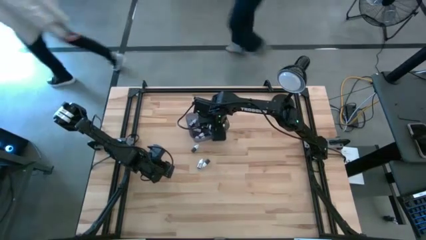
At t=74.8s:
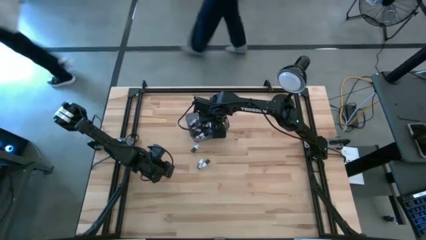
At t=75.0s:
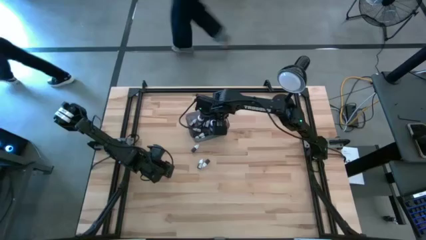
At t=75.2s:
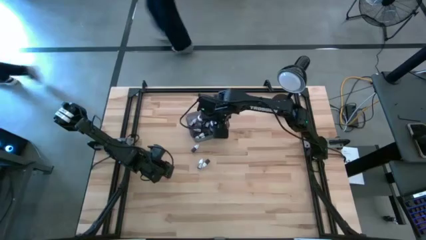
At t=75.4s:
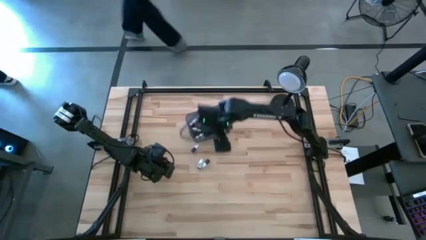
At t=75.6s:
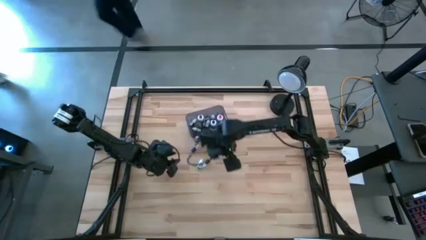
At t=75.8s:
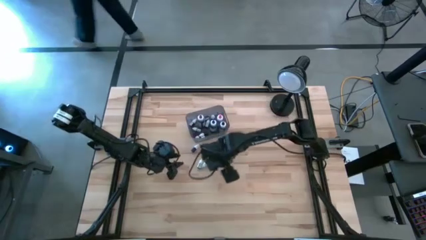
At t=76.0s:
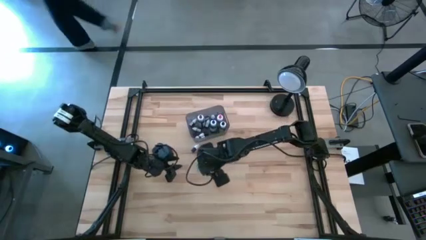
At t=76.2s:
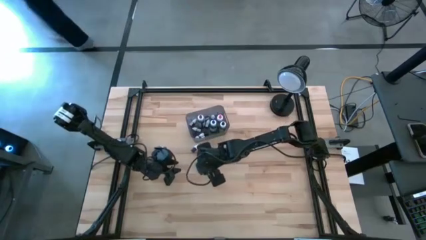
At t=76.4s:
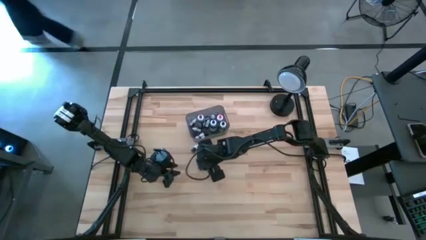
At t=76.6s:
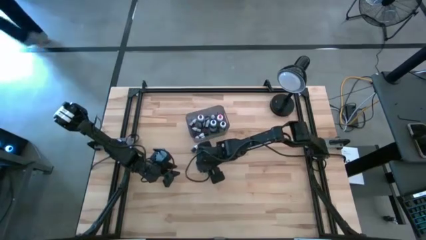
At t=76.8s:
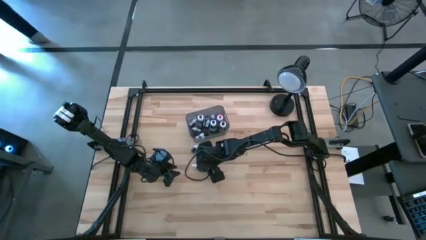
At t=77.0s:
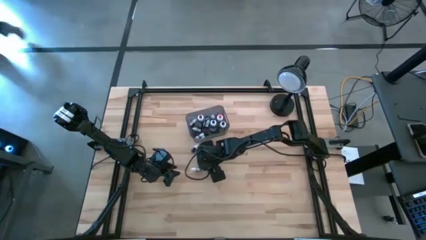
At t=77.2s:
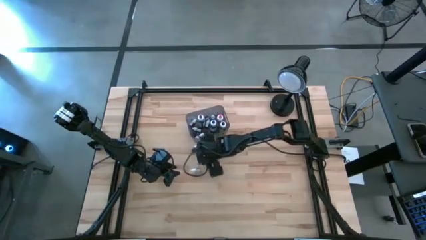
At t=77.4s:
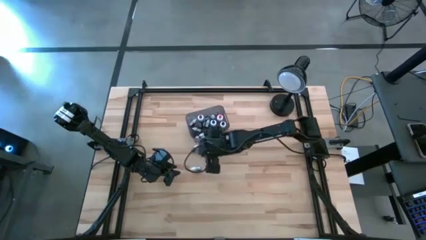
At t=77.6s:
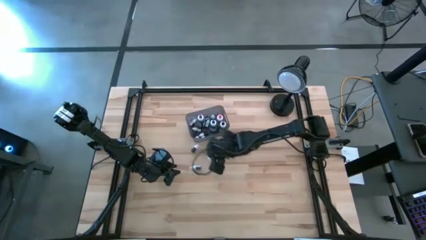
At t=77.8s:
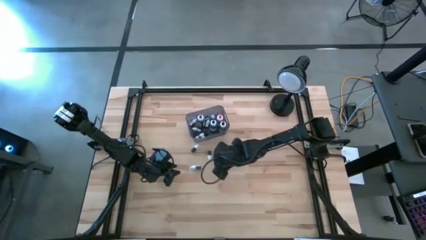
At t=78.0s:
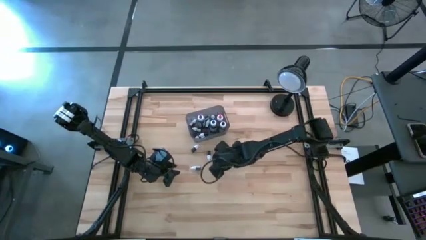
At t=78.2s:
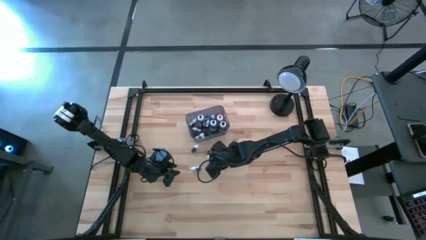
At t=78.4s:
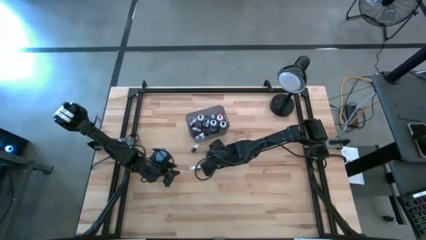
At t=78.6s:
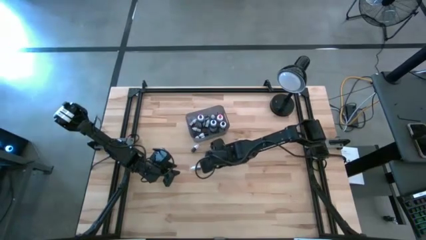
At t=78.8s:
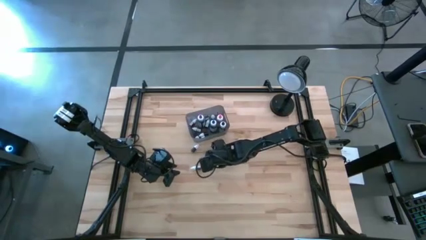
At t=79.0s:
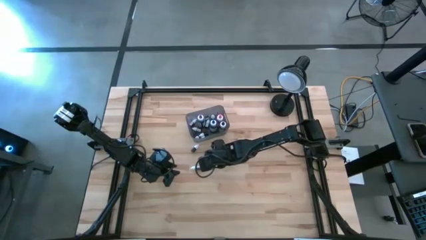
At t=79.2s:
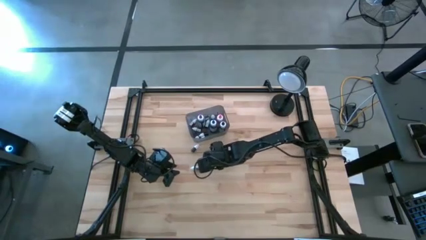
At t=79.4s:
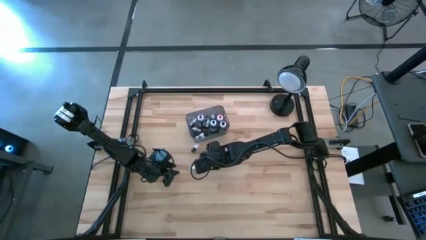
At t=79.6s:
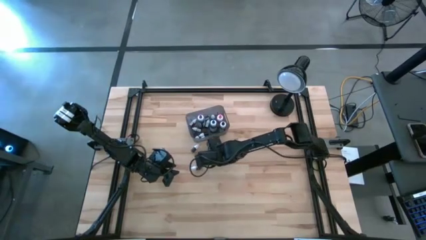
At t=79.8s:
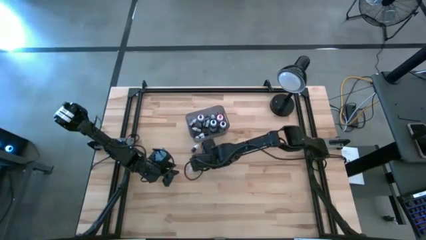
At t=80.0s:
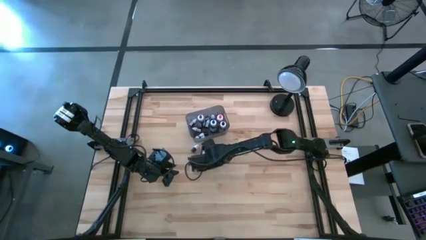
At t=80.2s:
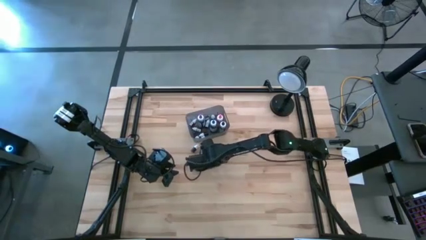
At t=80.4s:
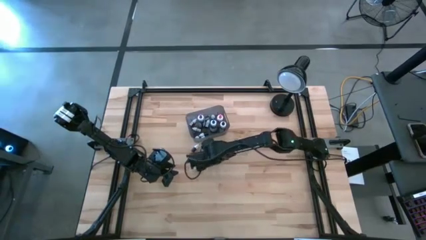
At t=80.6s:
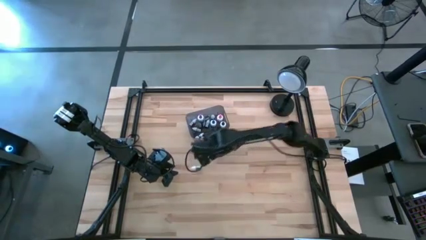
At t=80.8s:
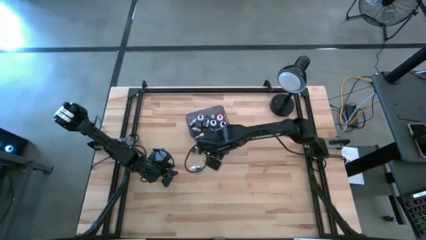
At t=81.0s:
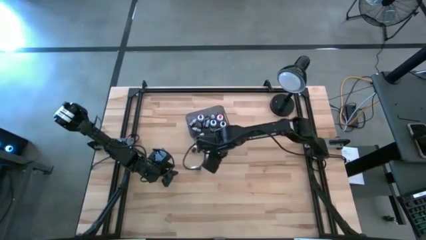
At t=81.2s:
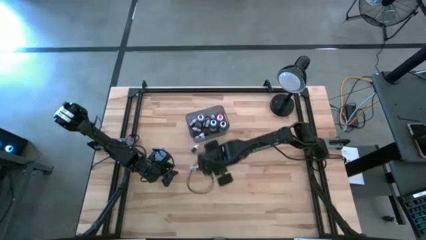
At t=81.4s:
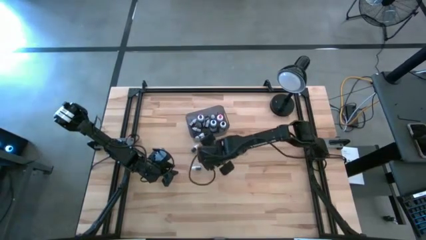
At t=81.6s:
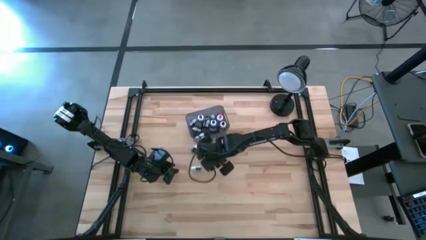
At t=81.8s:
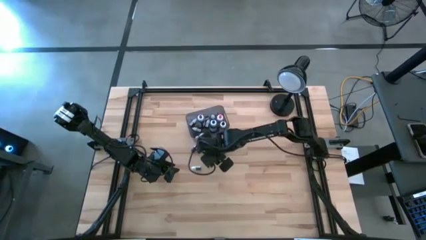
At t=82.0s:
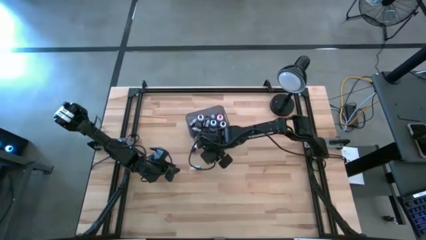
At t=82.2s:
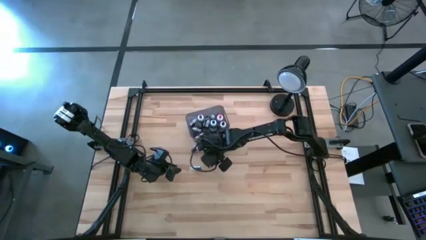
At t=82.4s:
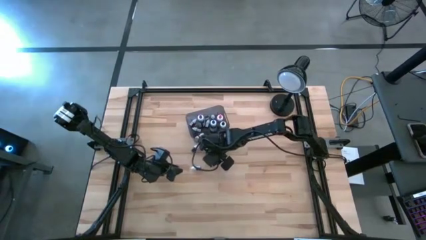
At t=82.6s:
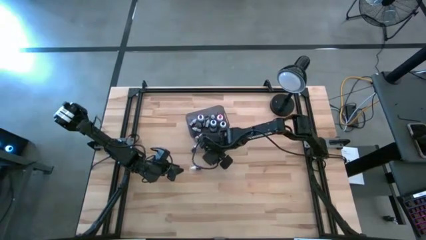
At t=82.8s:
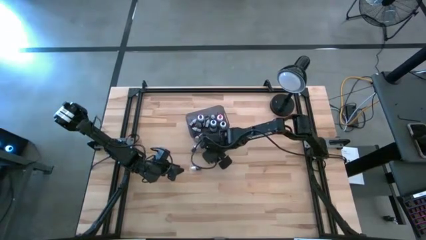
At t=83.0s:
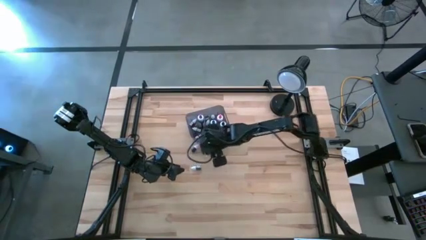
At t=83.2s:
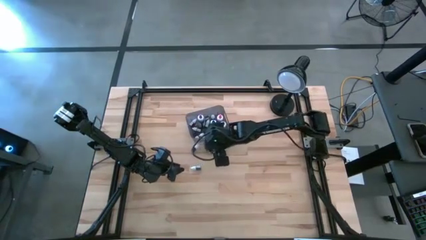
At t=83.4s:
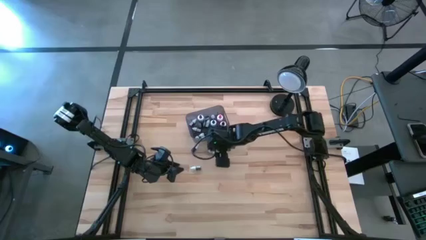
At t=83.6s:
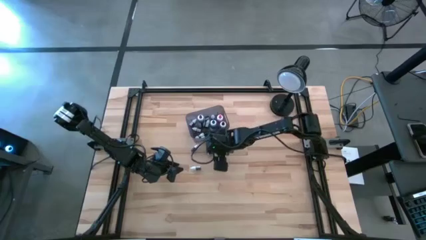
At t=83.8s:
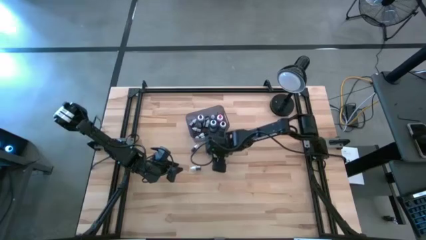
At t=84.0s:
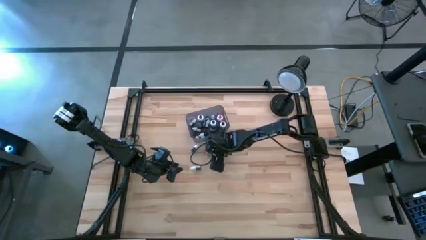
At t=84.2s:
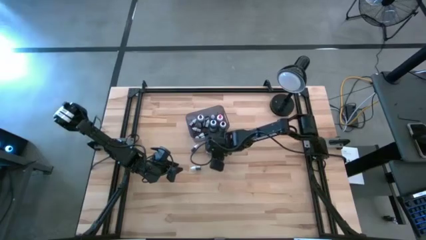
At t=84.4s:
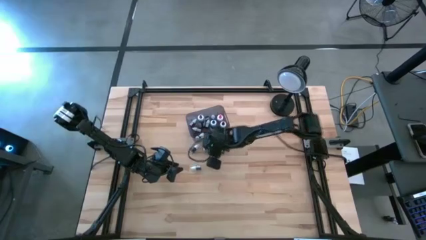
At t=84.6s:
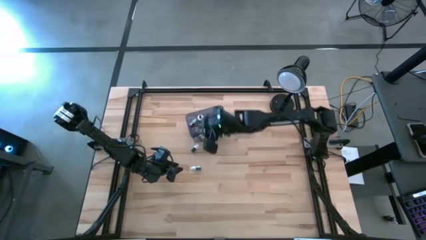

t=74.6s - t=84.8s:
Task: Pick & Place food coloring
Put the small green food coloring bottle into the gray bin

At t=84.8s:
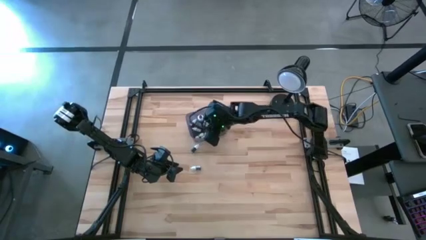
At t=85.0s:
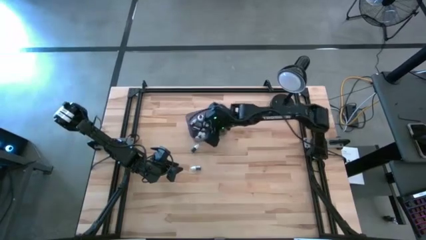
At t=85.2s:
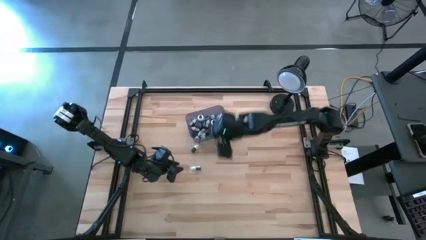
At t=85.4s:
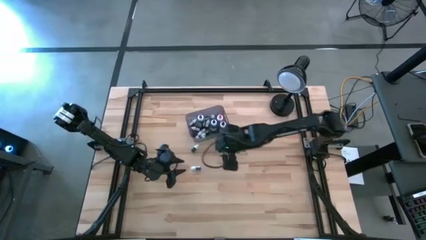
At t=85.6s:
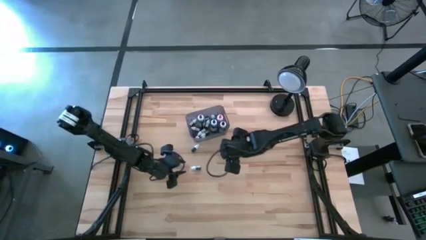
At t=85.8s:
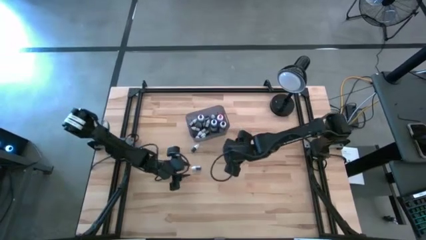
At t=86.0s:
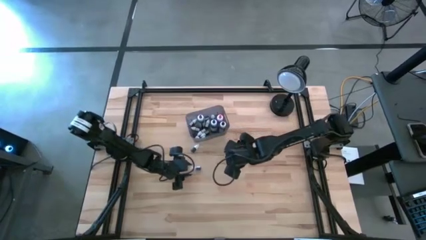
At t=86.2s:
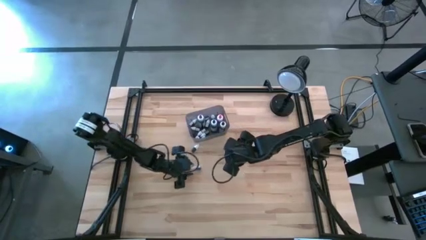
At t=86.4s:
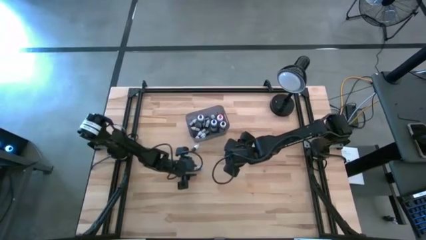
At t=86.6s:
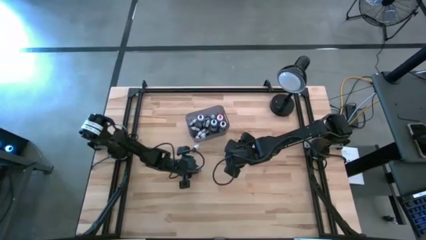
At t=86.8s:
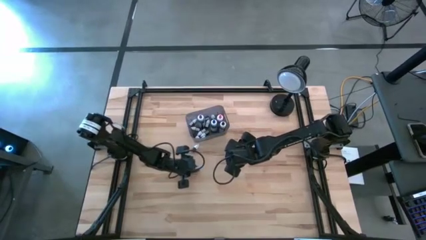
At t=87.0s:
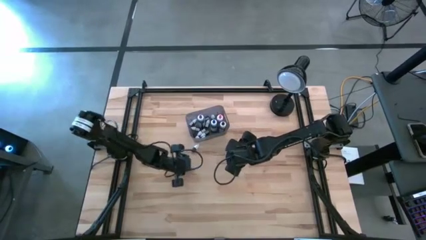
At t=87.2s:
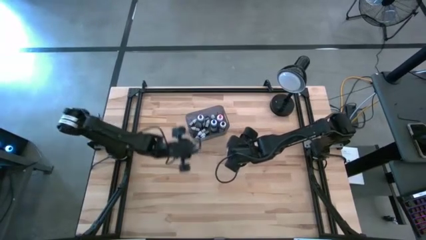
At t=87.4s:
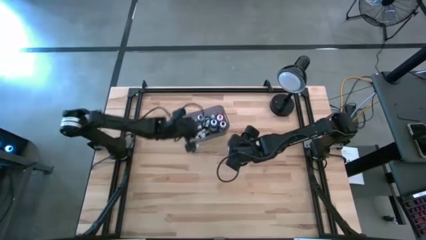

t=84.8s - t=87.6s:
Put the small brown food coloring bottle into the gray bin

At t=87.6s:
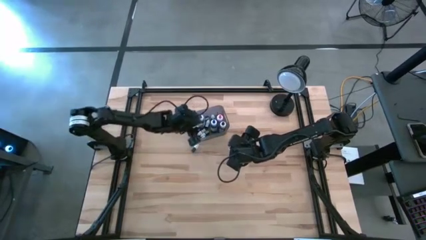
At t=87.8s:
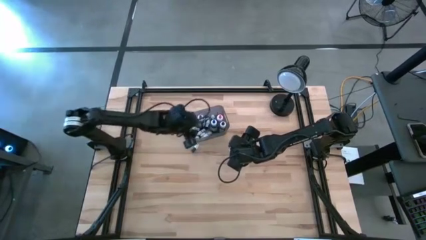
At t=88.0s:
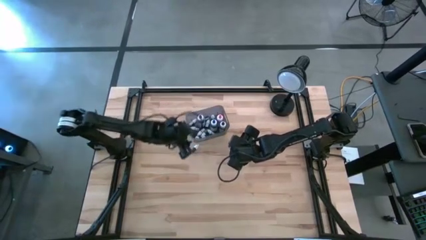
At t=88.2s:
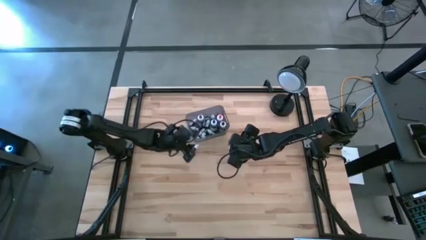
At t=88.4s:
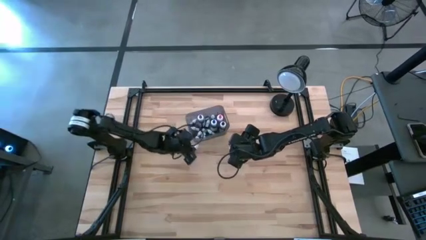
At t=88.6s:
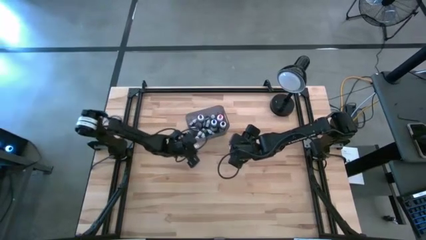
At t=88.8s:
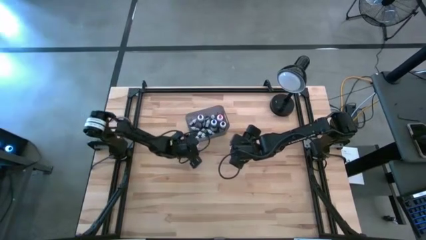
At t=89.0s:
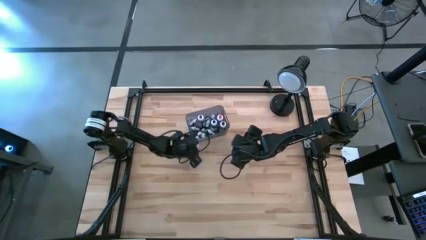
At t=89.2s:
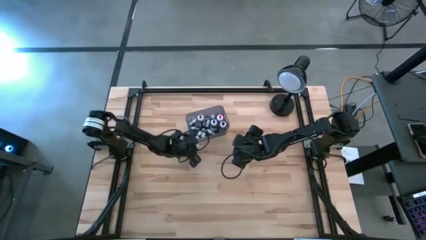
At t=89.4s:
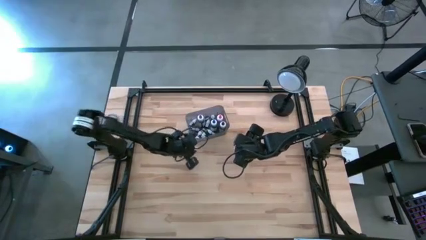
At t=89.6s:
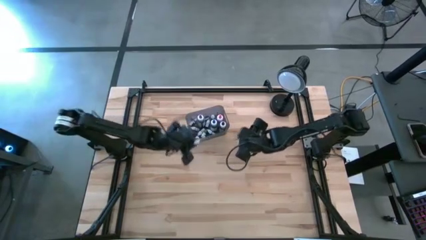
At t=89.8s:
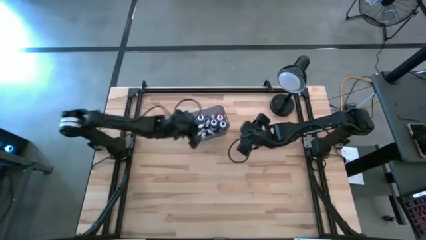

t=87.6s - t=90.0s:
Put the small blue food coloring bottle into the gray bin
